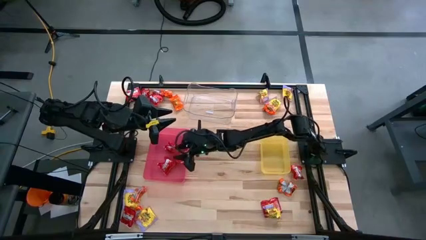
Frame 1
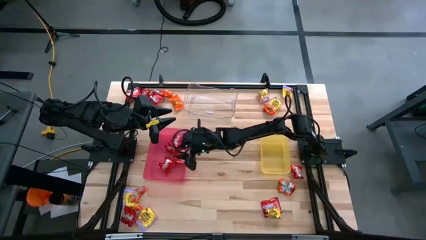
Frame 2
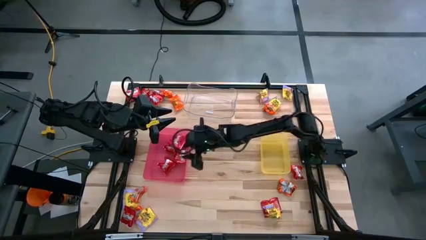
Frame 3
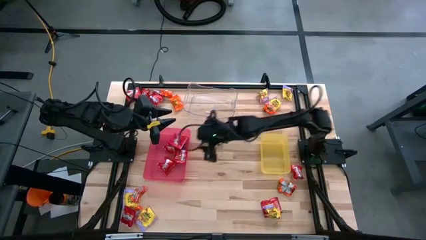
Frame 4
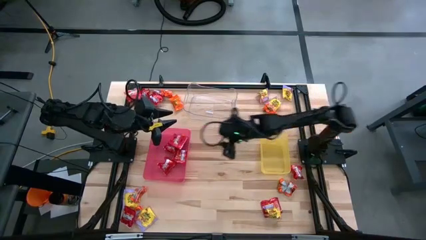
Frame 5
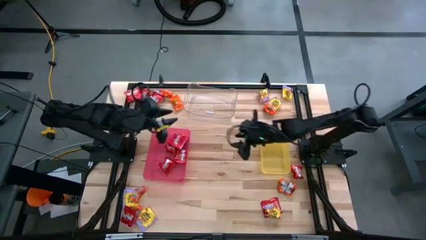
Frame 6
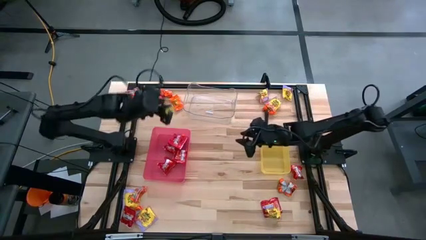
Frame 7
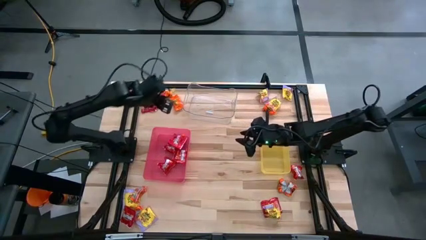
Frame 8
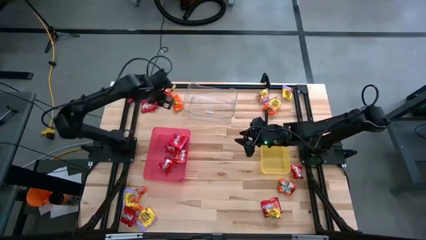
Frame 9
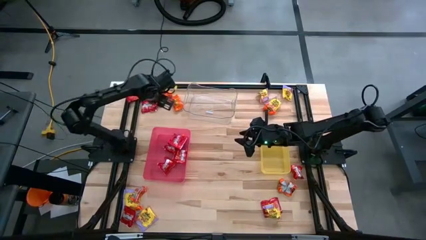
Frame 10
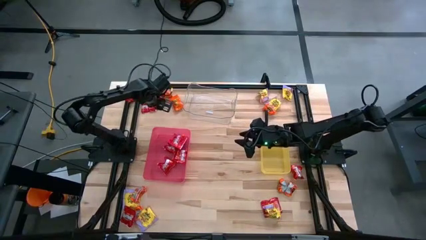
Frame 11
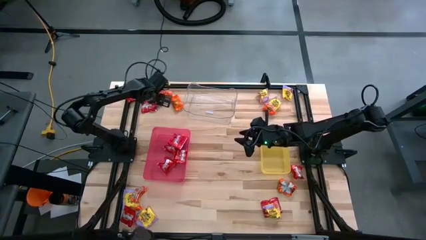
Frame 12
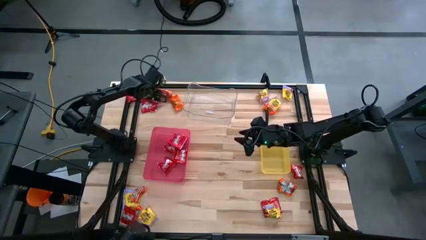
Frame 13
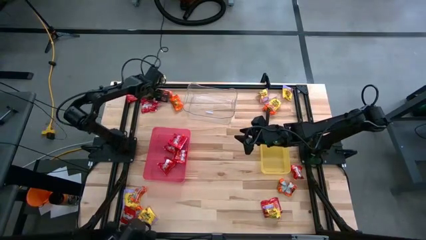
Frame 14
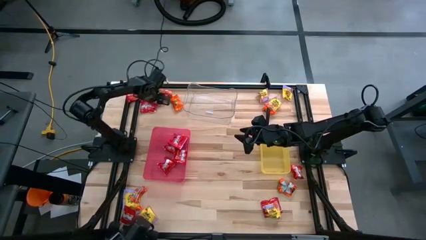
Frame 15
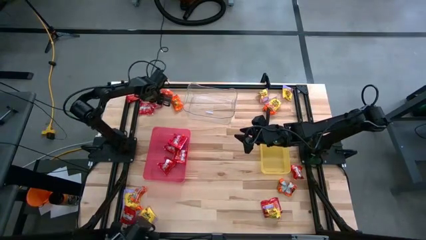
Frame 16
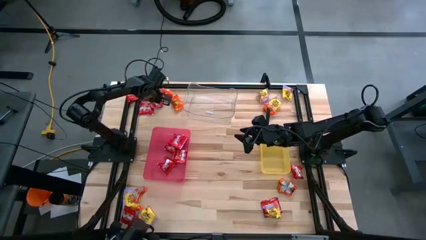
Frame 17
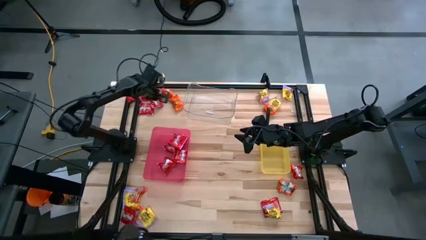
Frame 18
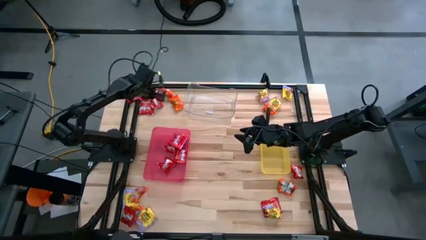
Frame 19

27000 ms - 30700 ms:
Task: Sort candy
Put the red candy into the red bin

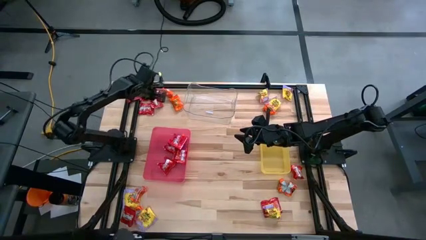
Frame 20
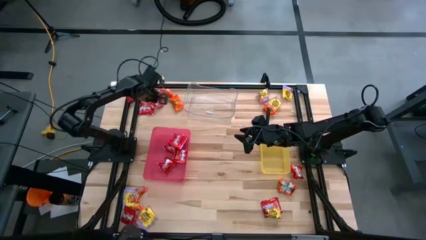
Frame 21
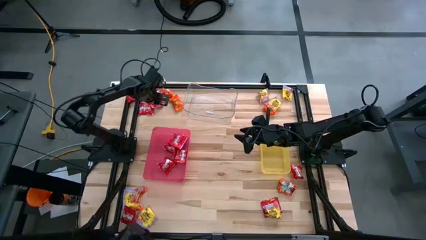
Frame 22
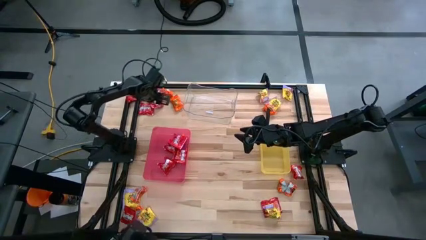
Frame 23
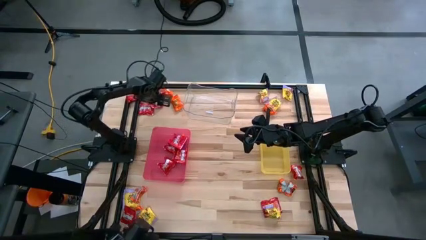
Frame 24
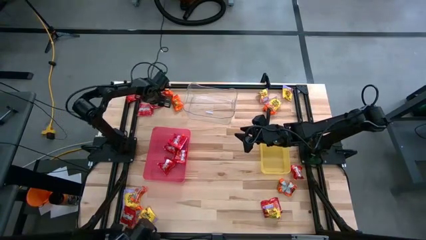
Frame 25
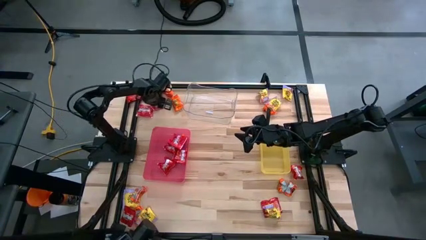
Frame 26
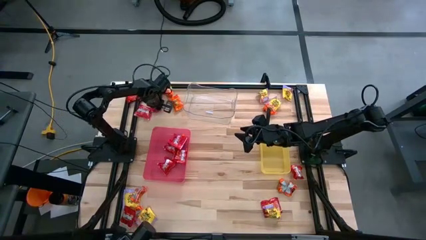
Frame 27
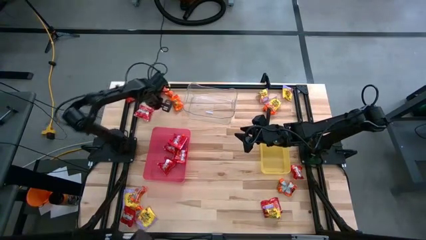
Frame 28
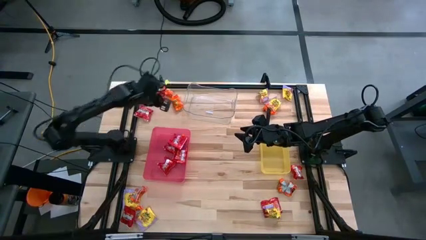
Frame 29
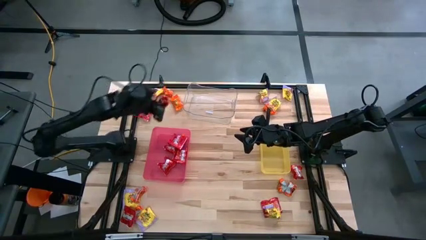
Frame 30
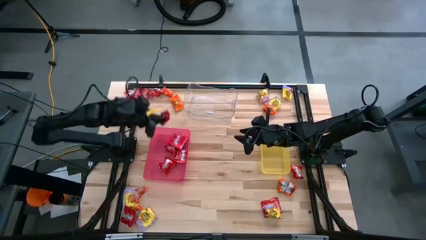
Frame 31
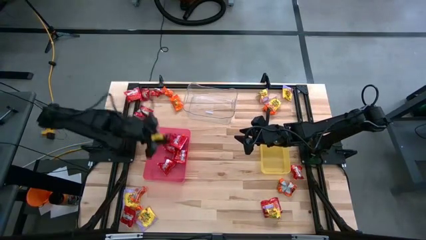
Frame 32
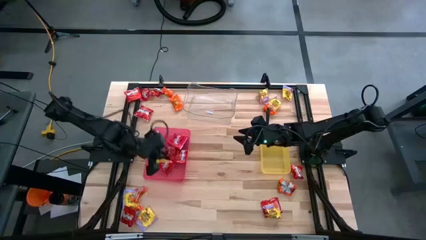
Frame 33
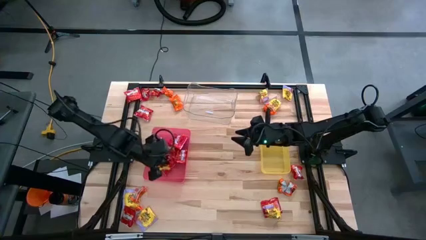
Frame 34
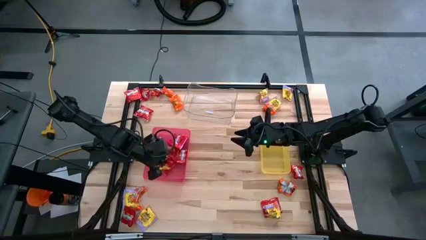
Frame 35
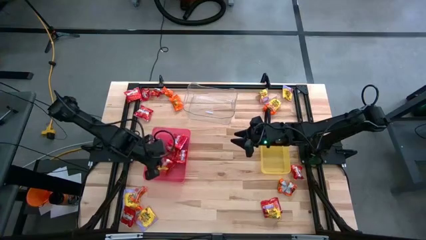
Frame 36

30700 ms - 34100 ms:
Put the red candy into the red bin

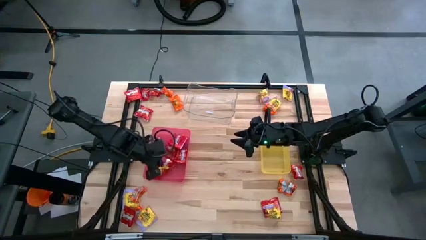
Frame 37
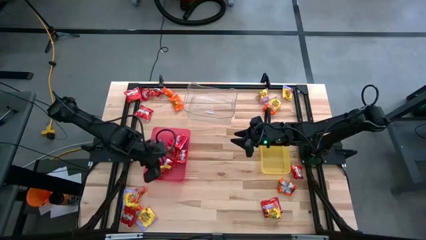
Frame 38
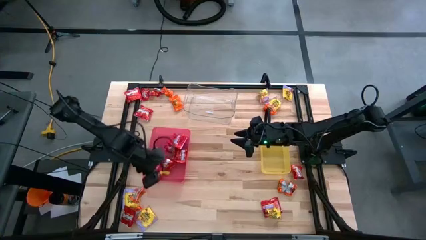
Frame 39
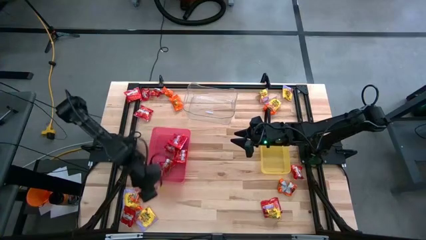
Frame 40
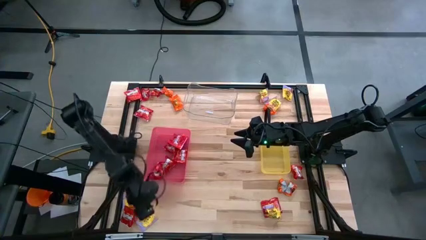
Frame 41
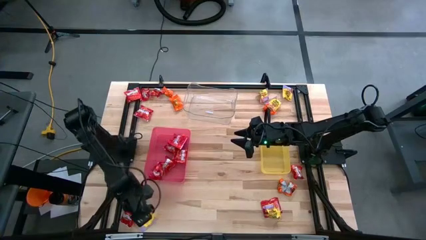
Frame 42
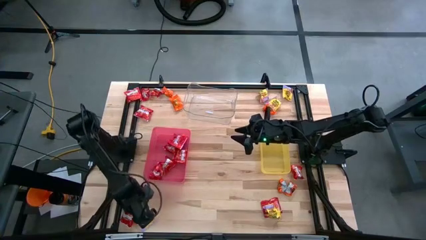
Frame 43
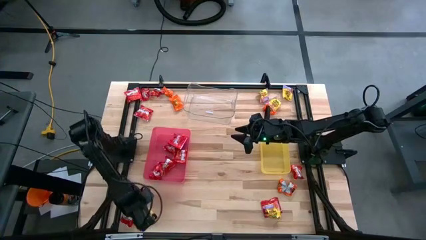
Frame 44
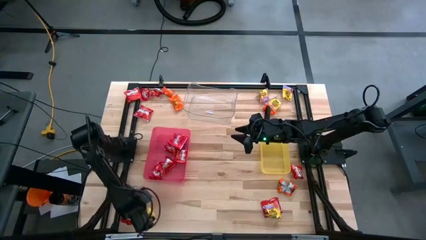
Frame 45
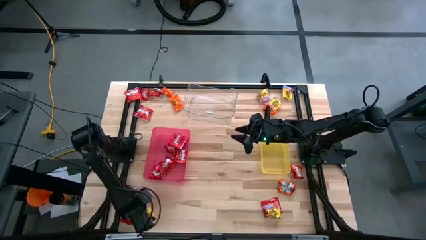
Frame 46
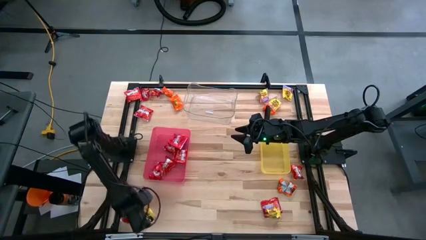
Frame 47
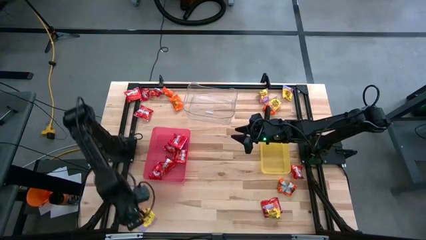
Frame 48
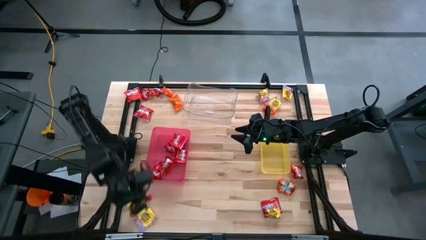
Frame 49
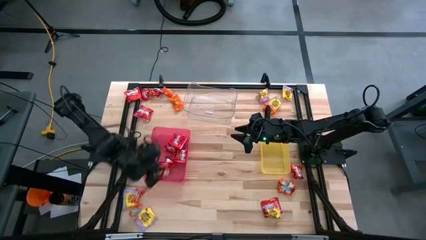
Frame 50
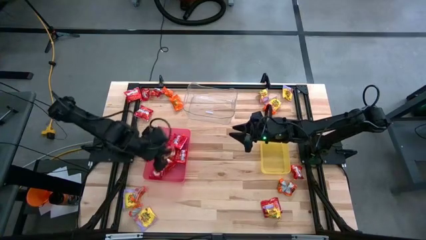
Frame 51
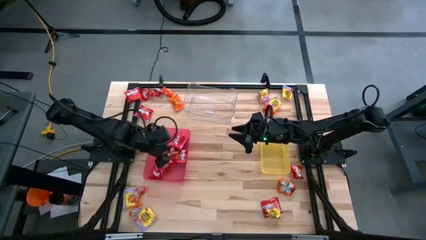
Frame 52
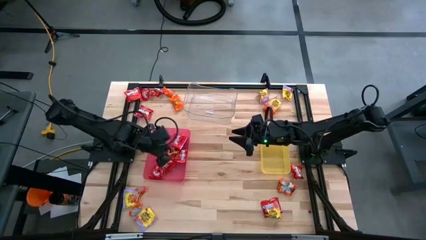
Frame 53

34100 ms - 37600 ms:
Put the red candy into the red bin

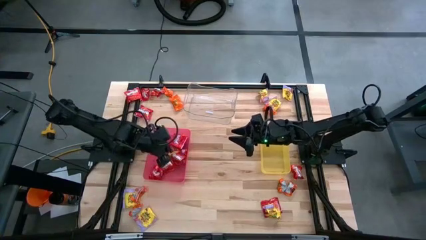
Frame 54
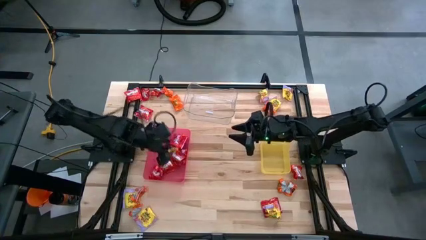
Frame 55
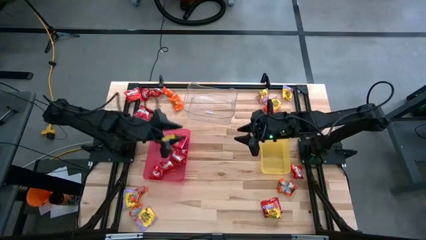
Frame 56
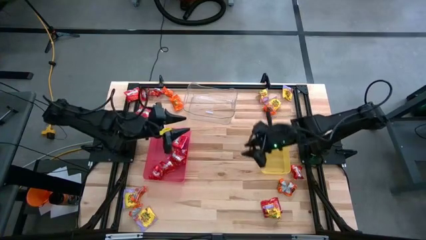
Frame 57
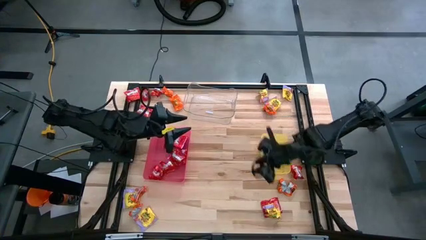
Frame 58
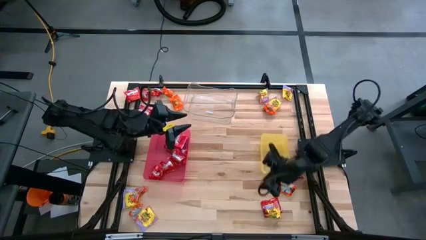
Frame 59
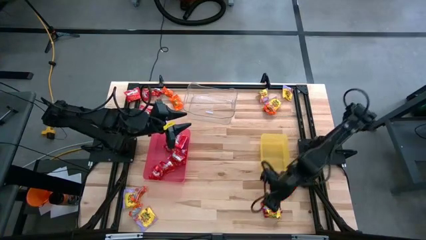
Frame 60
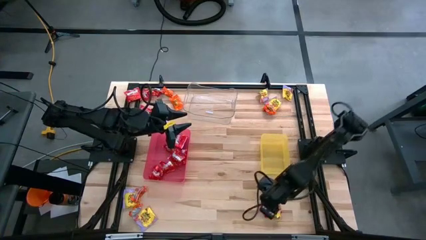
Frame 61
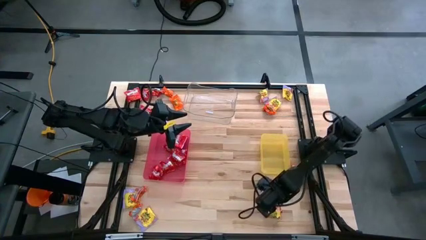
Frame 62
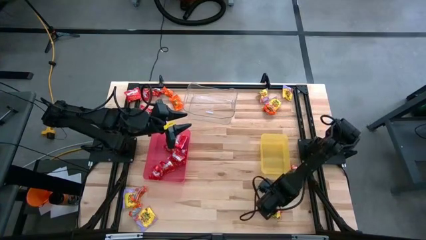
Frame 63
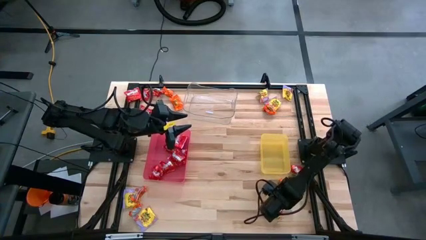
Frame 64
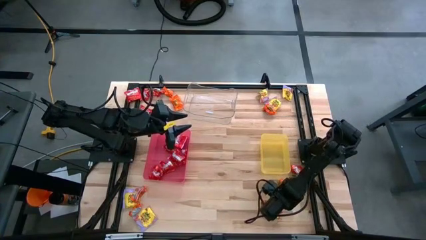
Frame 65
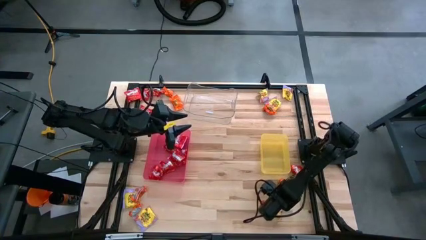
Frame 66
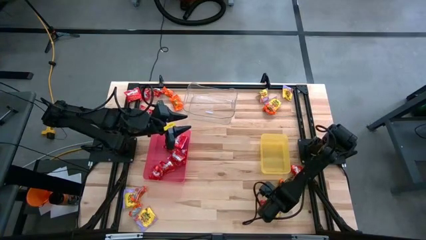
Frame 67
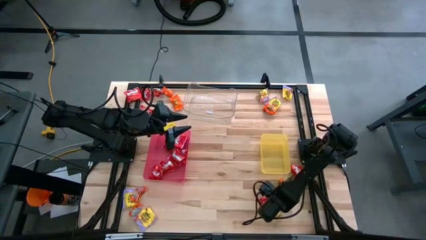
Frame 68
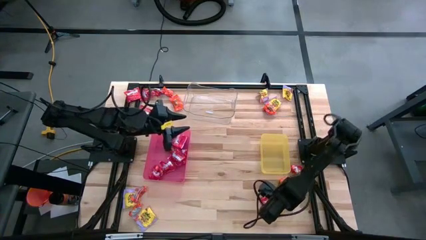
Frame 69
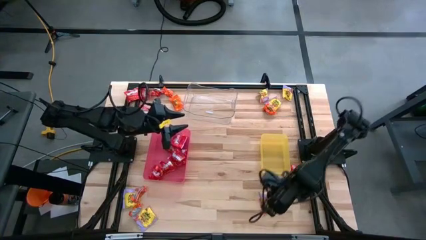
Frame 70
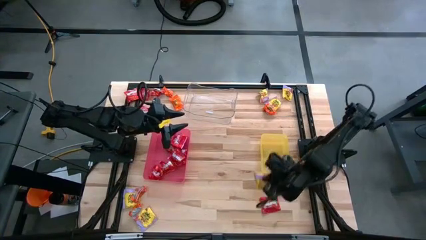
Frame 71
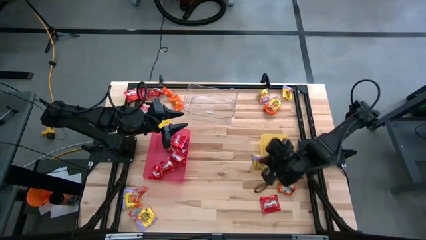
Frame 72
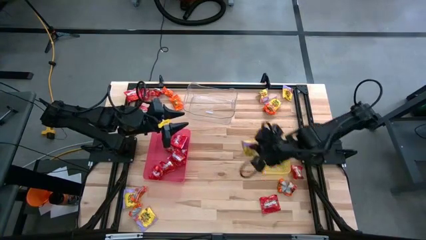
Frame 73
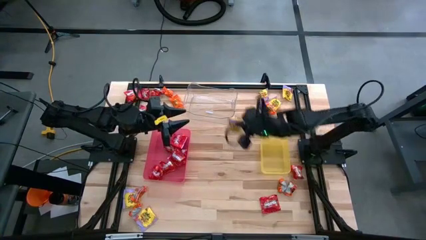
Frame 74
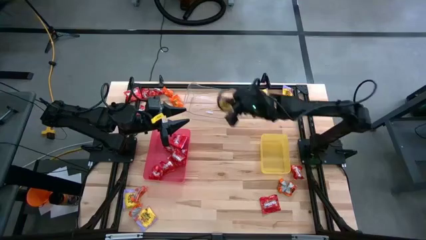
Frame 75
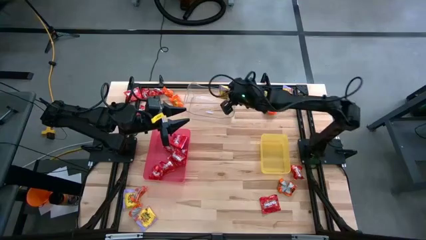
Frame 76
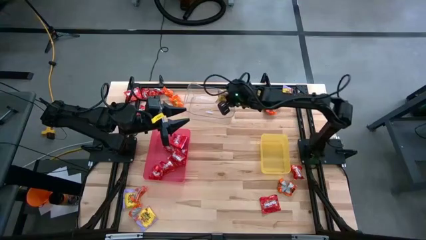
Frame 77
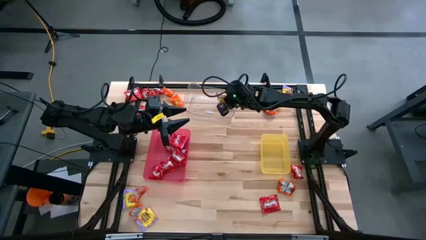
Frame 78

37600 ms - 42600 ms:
Put the yellow candy into the transparent bin

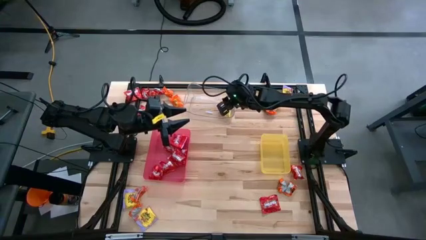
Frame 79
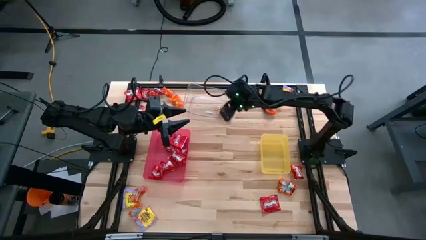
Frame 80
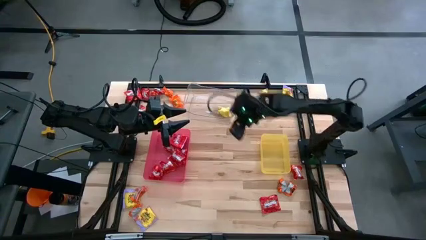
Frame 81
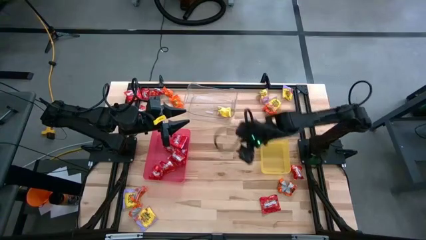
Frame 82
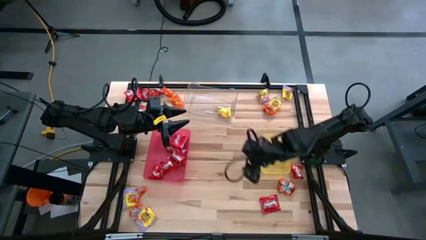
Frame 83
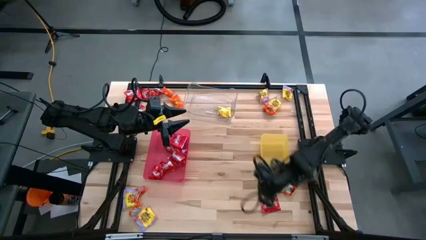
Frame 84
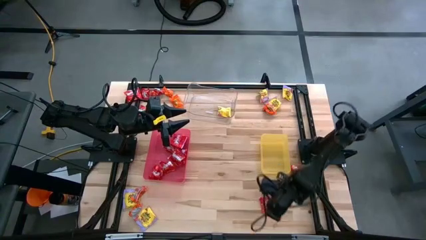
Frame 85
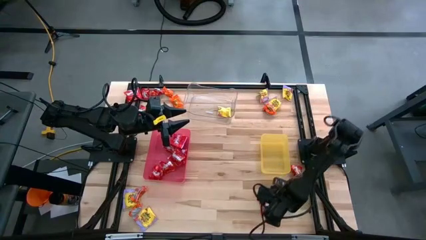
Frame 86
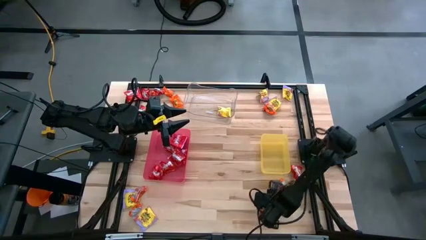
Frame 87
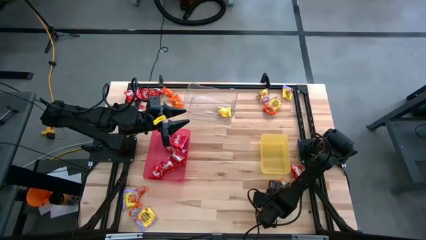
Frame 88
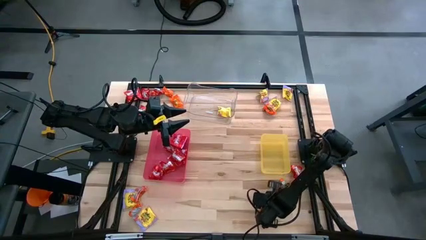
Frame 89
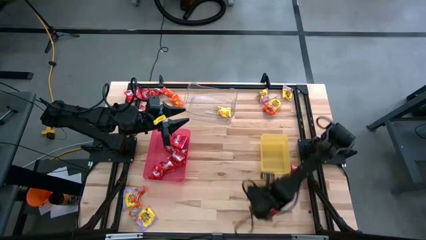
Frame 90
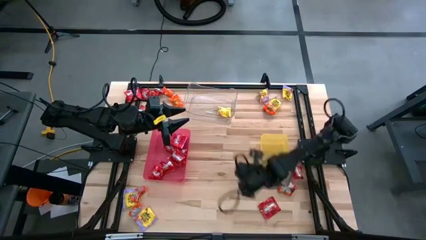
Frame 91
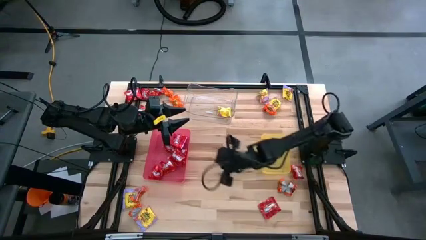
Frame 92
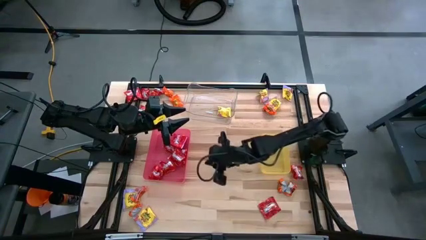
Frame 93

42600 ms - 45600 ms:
Put the red candy into the red bin
